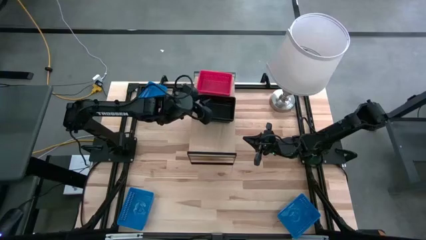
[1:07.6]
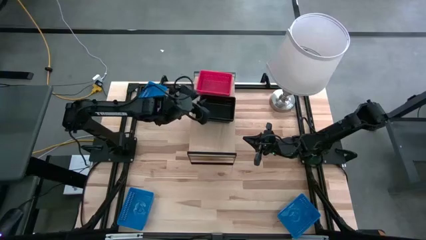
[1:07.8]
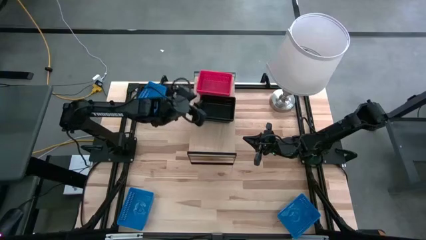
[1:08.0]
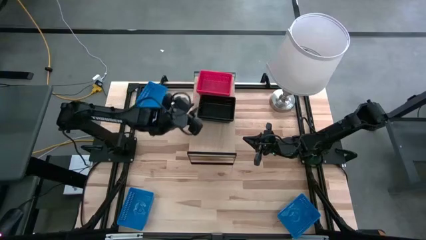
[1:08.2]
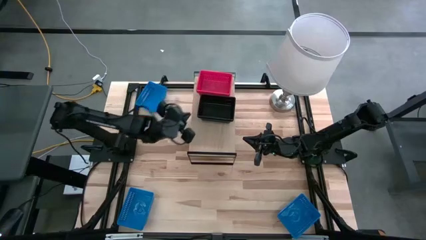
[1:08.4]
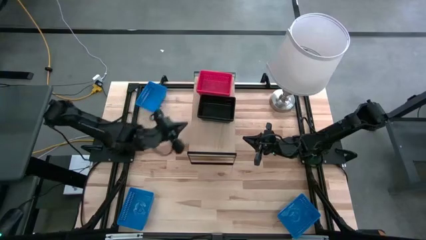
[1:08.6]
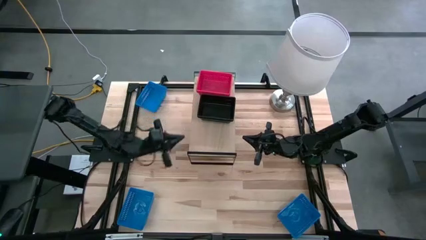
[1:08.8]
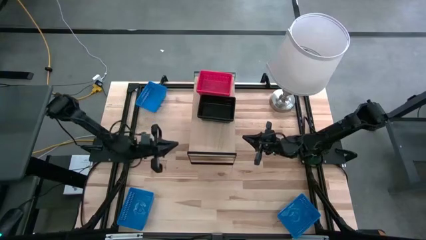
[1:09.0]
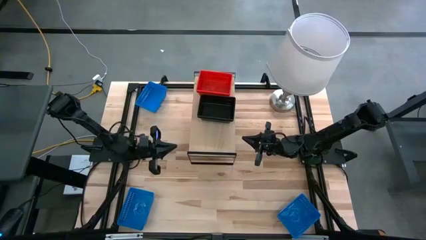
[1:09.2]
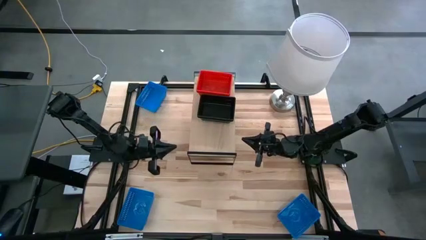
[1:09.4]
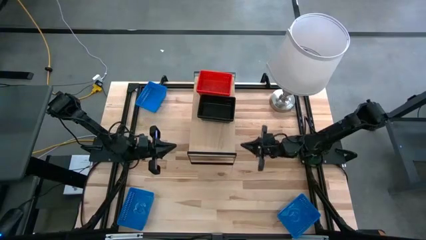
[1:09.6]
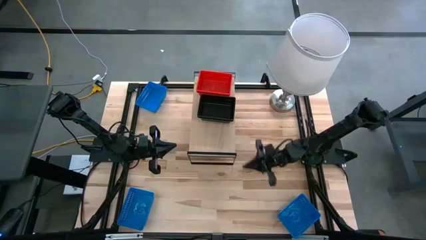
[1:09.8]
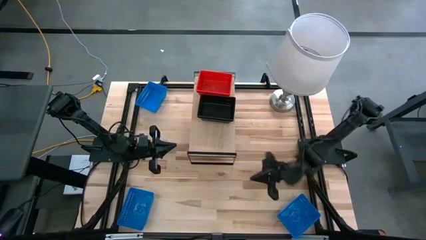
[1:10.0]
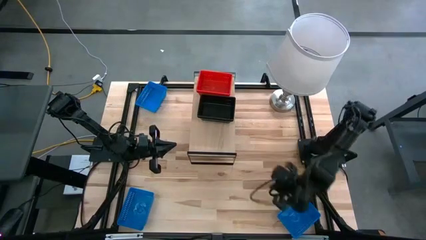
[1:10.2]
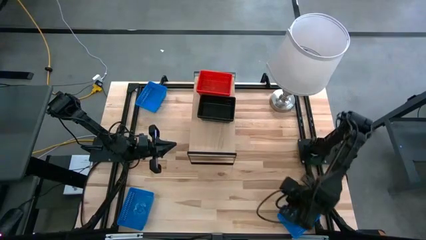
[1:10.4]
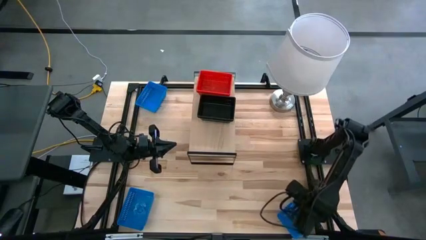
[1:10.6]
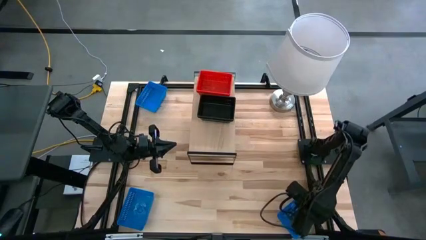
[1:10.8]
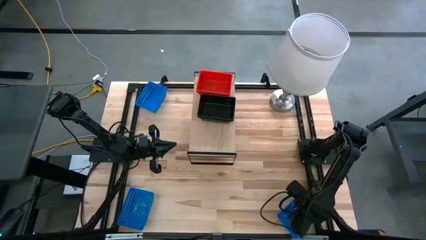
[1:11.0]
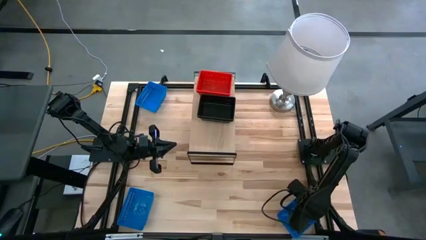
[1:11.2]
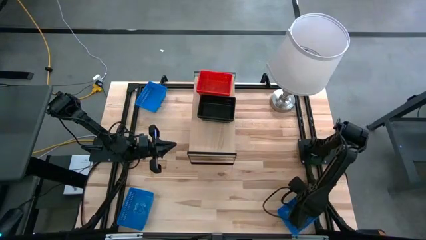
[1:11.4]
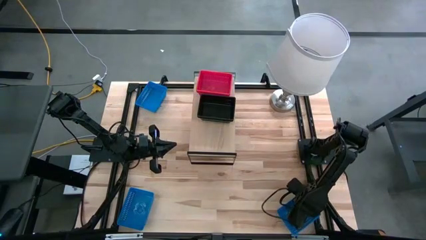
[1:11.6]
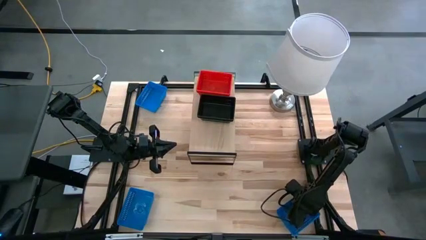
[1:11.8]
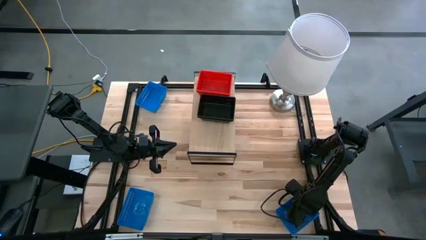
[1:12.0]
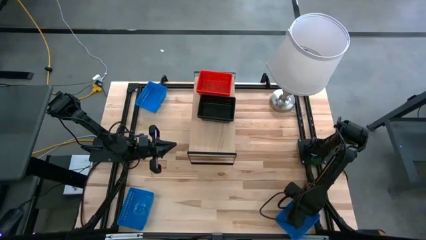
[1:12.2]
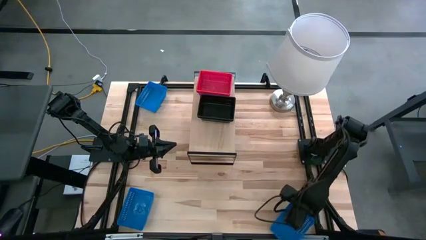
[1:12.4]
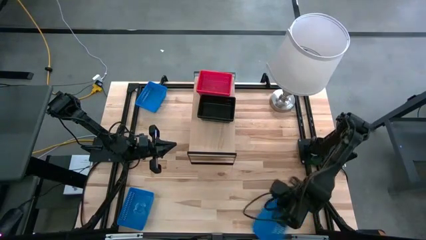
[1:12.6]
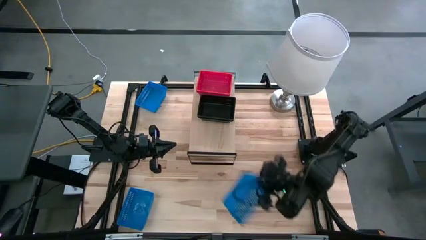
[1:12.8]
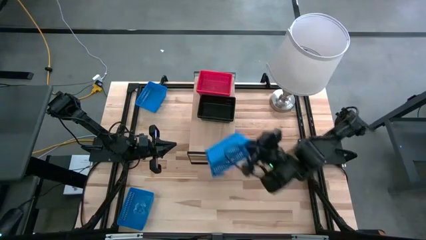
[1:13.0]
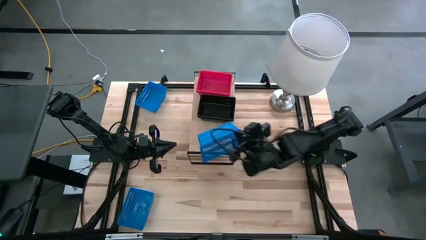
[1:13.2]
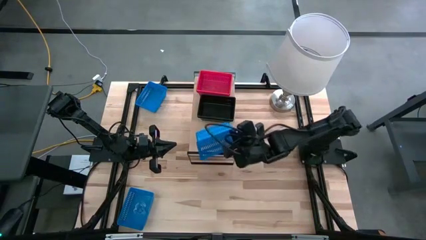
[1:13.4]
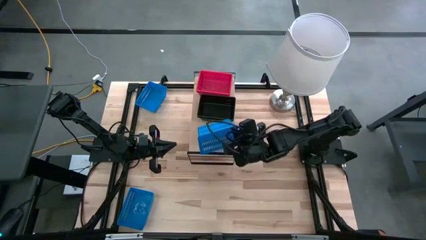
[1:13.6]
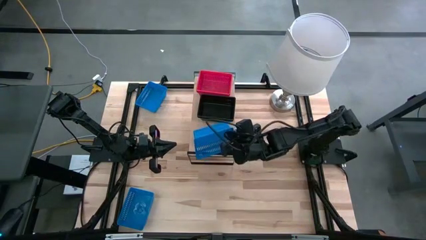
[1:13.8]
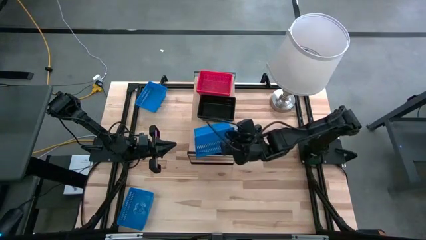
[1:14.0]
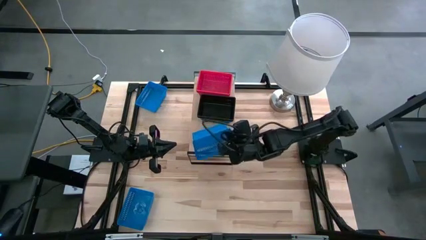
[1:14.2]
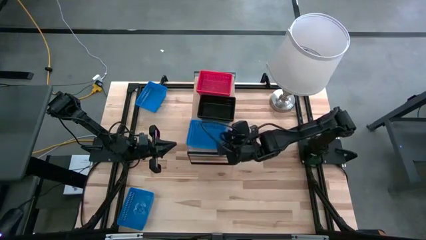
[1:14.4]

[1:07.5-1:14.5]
Task: Stack baskets on shelf by color
Put the bottom right blue bin on the shelf

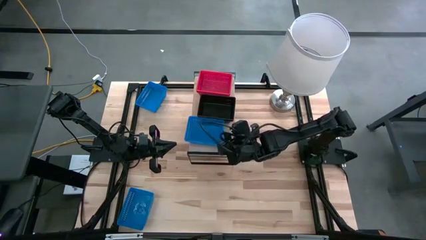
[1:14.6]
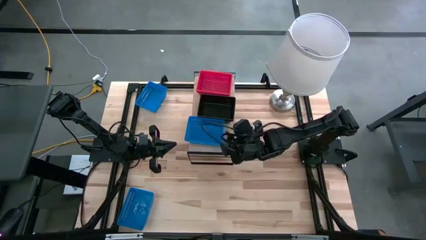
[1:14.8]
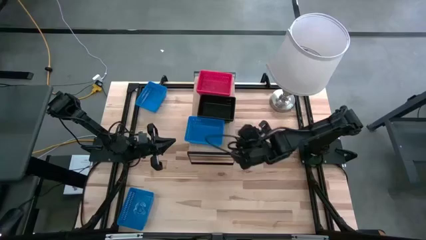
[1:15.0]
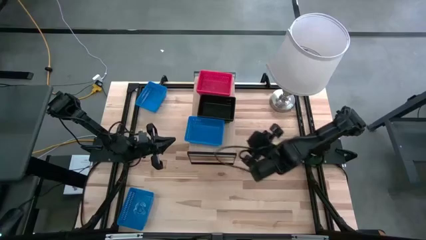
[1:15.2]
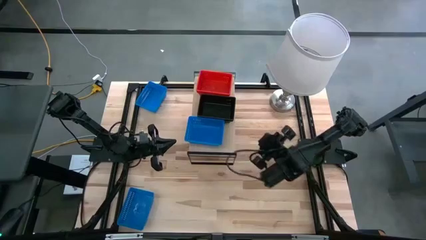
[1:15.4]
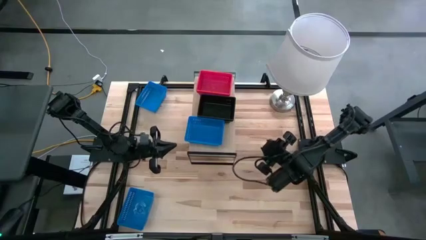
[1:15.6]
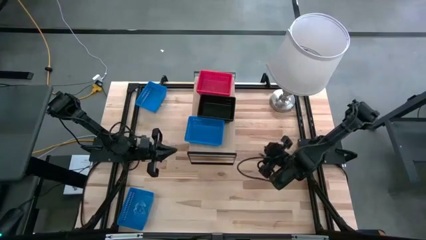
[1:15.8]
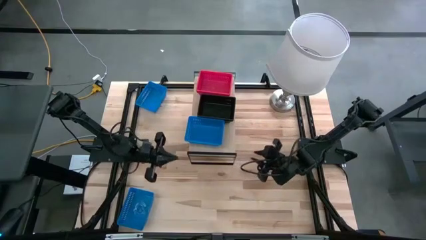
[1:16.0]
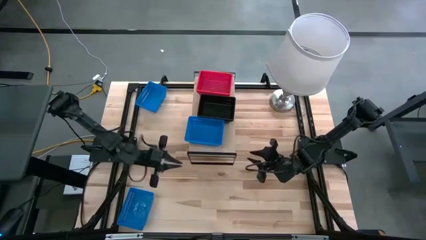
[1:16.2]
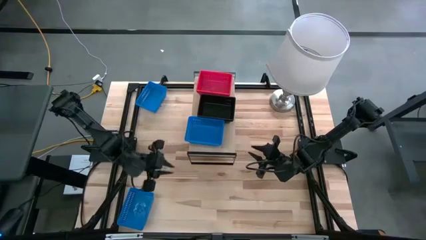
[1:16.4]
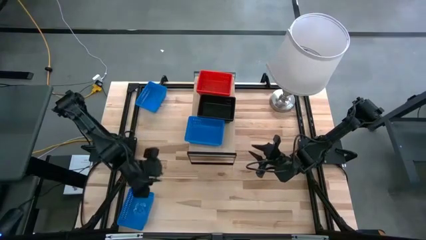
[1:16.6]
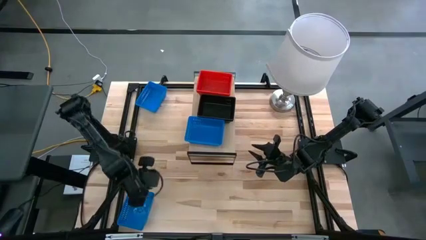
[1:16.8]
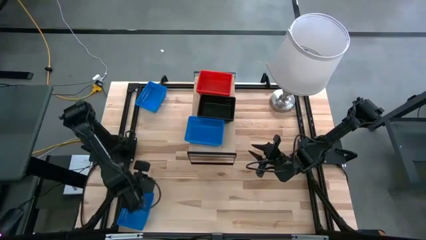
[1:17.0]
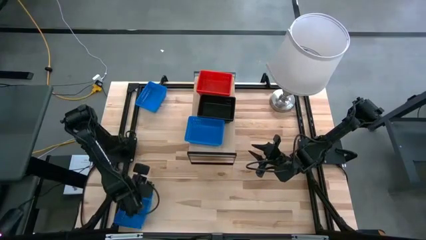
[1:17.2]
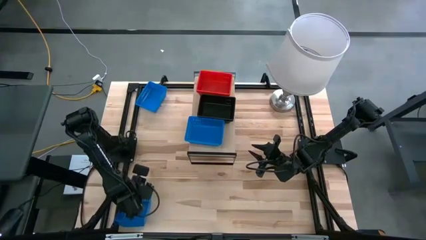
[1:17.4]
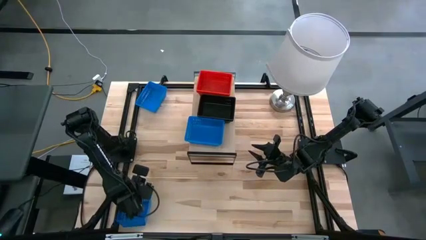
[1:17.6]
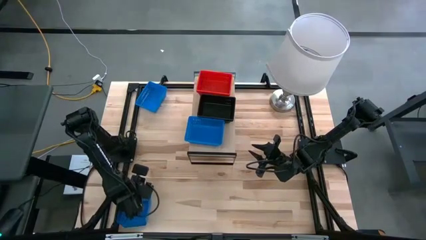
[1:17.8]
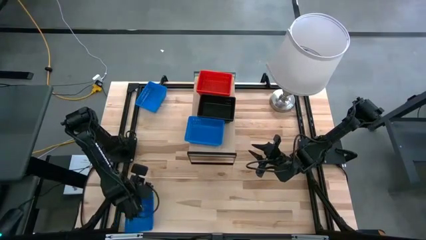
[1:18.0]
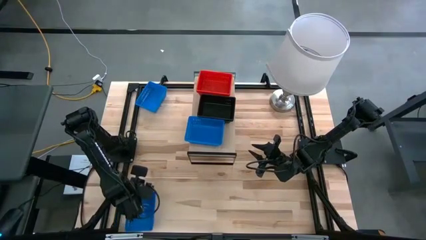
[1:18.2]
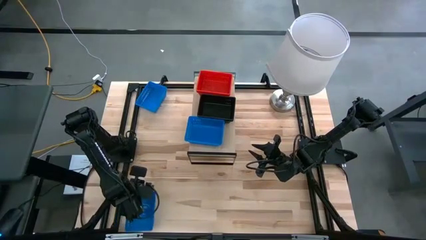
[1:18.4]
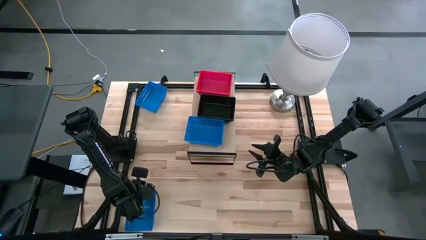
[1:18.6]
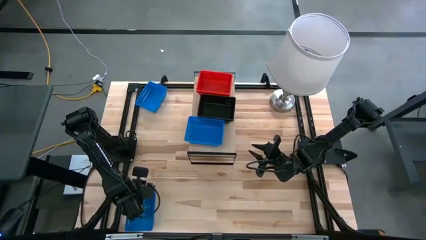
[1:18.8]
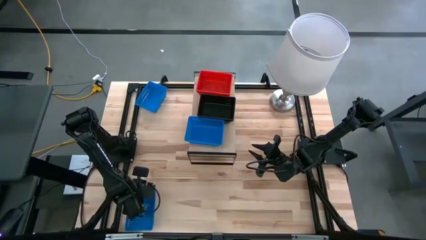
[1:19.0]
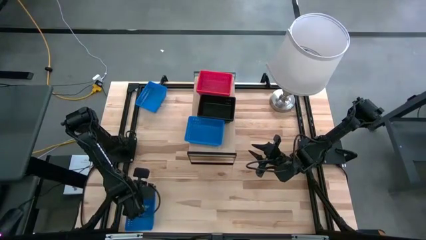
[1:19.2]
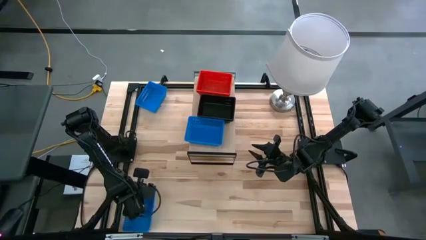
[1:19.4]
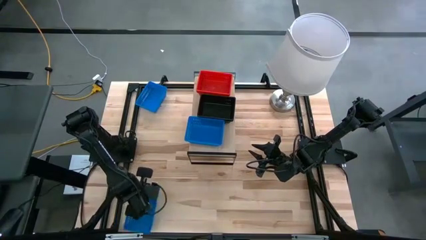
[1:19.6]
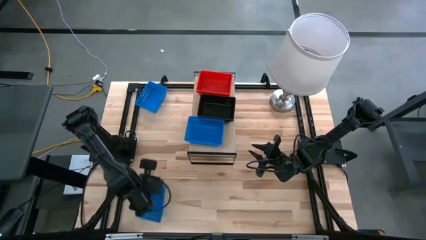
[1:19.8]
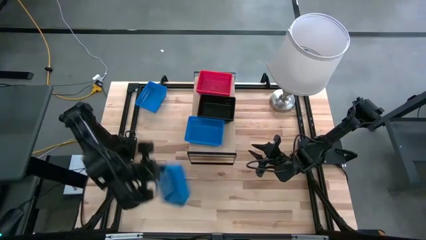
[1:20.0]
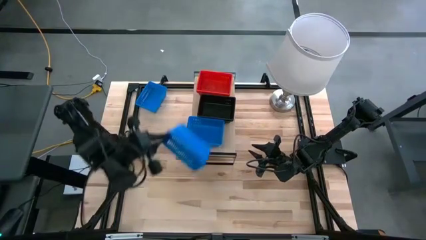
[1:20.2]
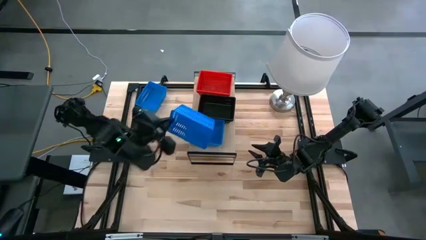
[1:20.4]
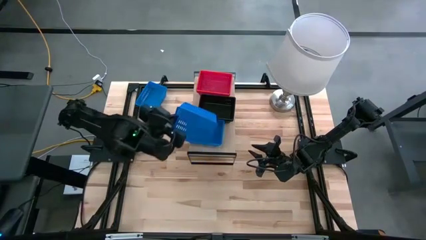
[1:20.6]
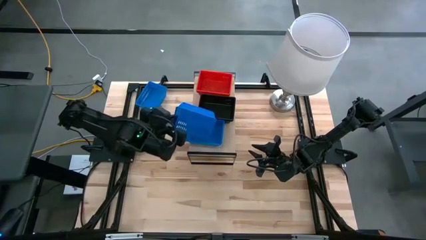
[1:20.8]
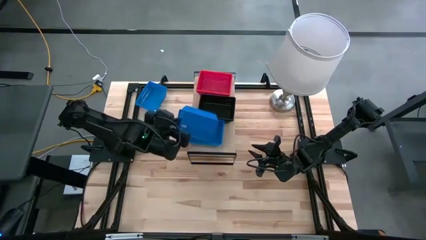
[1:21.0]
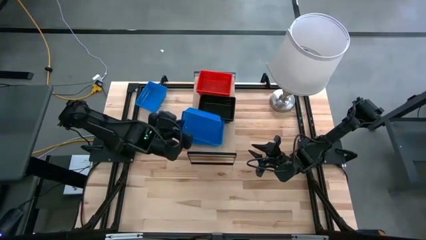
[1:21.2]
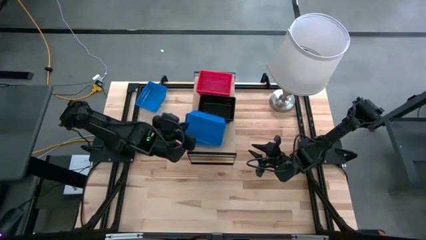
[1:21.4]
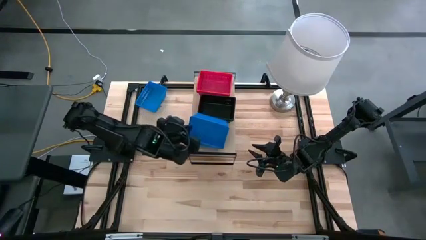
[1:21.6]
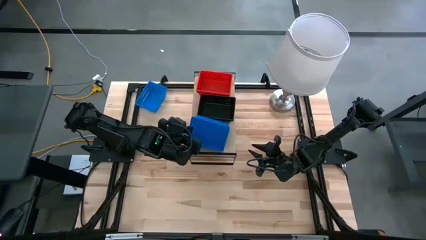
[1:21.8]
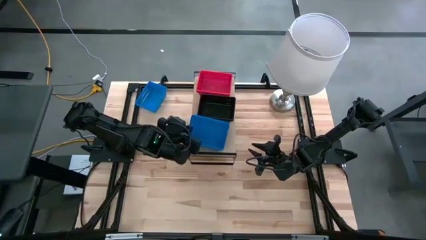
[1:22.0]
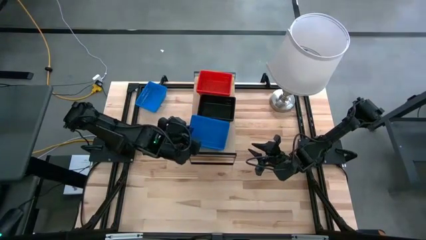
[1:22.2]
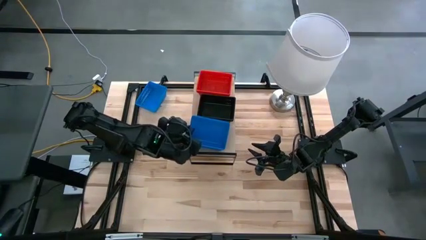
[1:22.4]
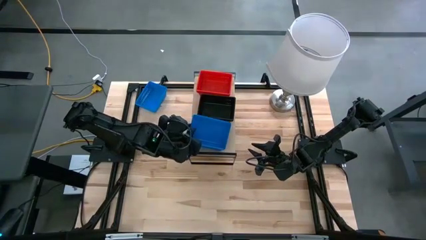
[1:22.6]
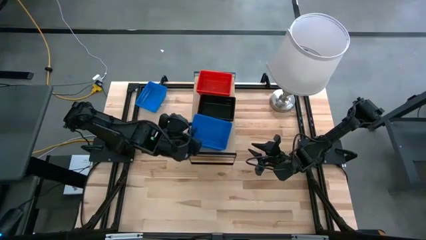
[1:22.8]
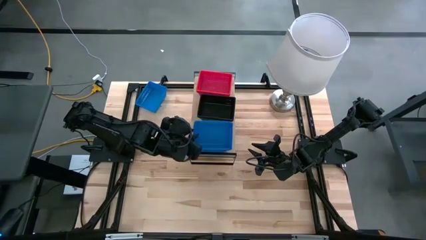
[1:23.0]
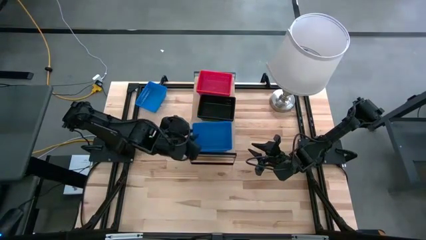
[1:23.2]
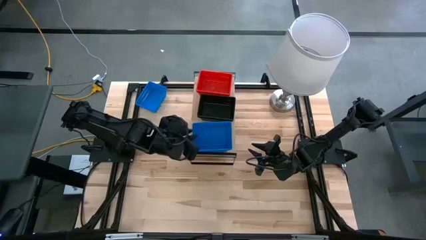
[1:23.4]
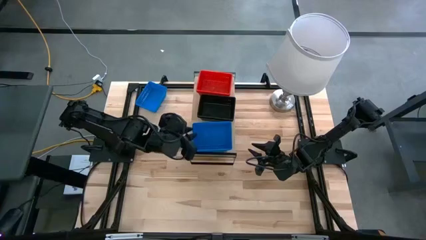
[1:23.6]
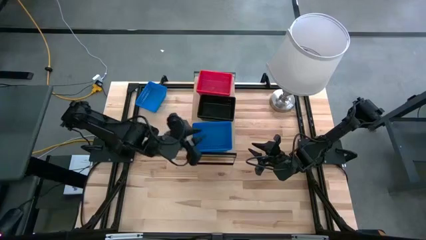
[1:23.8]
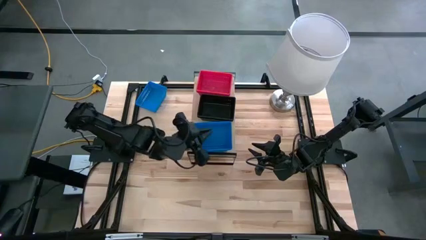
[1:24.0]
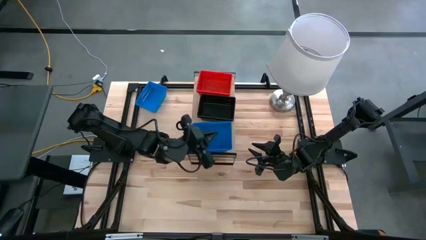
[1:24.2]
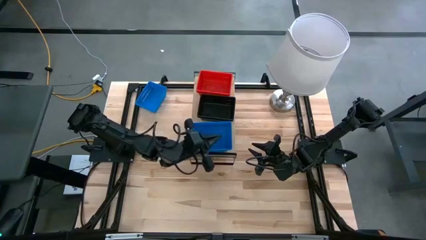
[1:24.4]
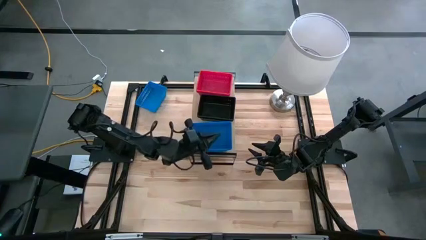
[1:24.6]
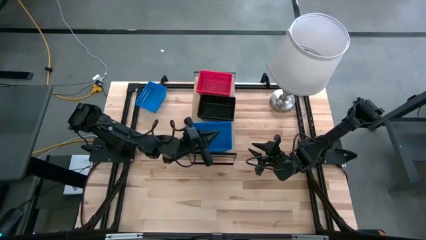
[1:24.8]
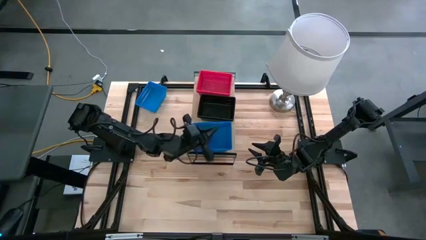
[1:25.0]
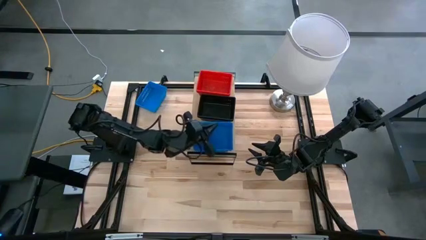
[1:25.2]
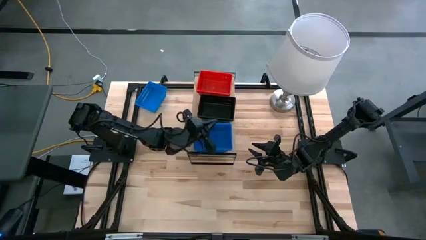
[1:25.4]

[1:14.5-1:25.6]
Stack the bottom blue bin on top of the blue bin on the shelf
